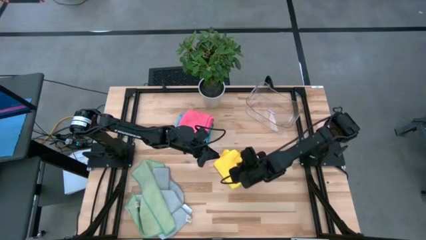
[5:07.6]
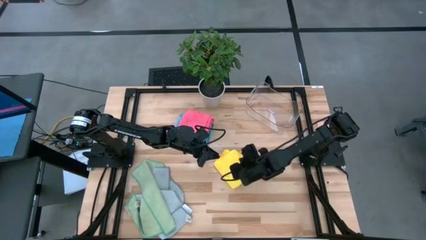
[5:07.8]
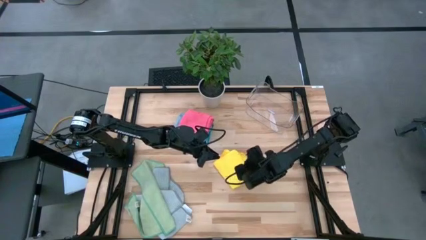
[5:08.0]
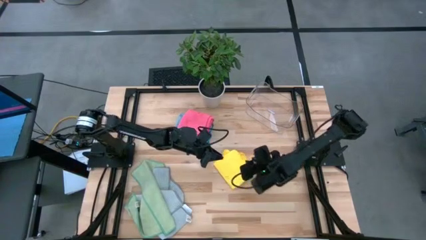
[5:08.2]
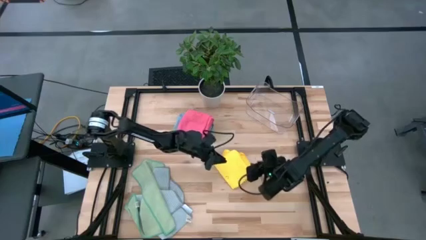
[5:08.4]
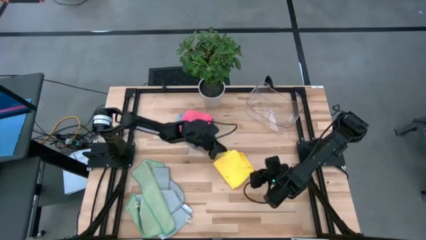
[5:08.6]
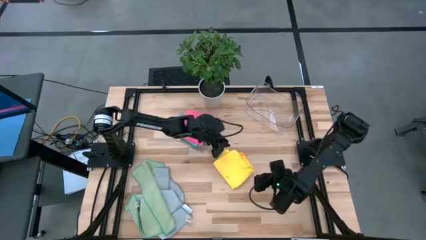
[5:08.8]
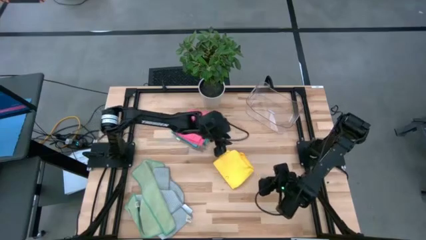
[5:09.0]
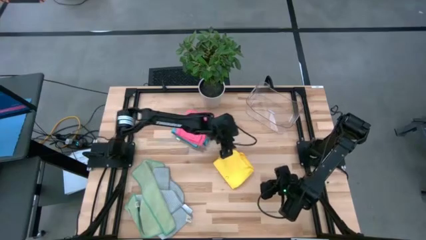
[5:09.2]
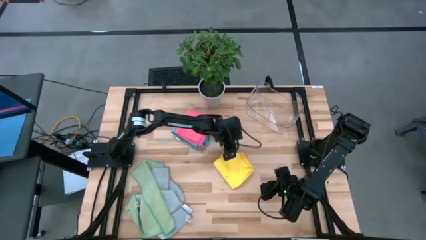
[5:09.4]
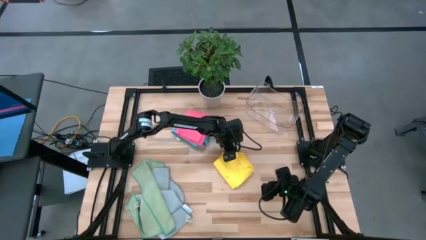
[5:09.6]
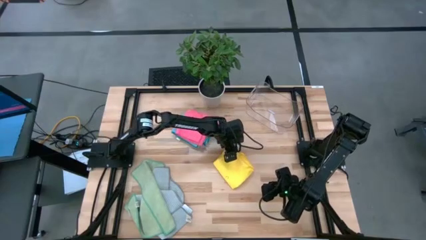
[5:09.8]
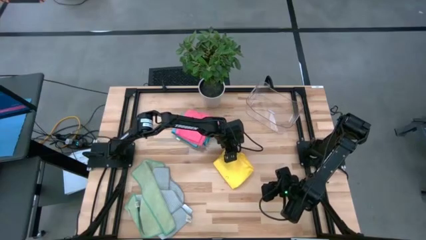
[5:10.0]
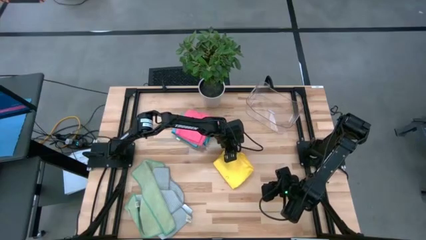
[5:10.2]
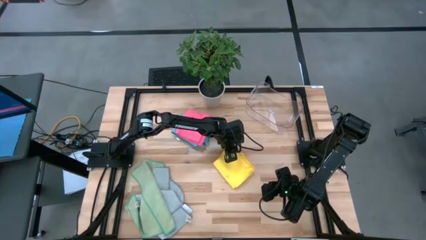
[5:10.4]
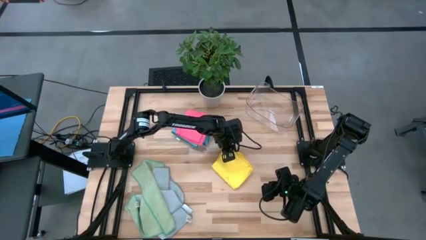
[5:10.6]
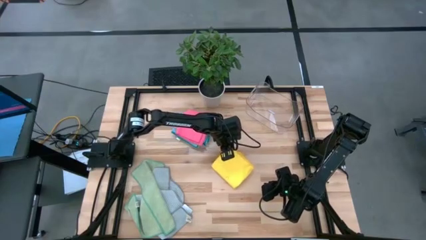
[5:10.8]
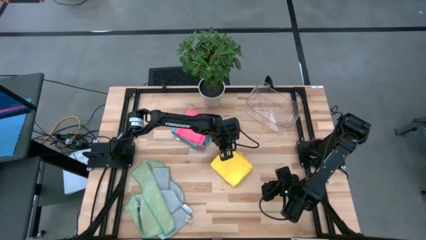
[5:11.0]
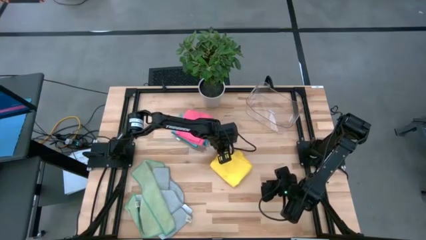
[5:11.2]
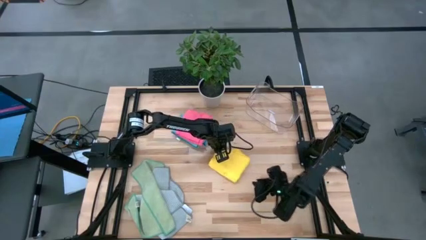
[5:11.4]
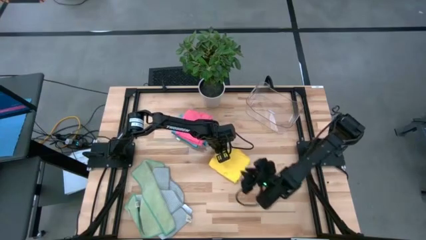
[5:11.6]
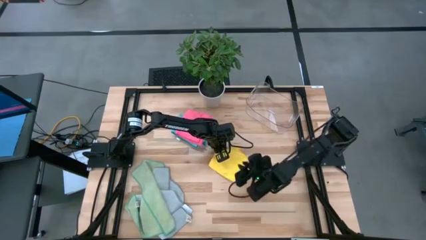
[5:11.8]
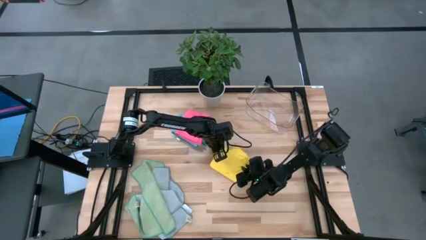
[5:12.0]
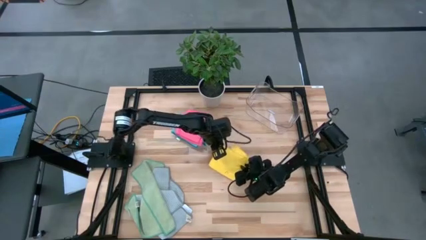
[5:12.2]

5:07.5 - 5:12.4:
Task: Fold microfiber towels
Fold the yellow microfiber towel

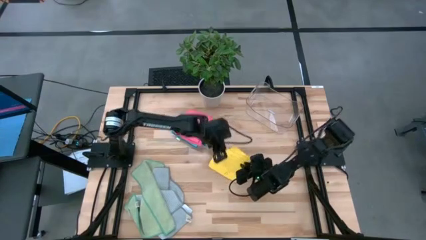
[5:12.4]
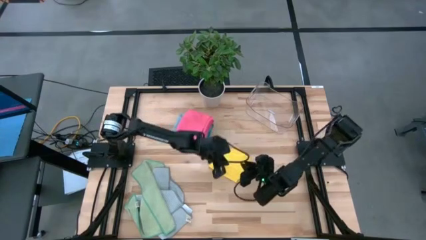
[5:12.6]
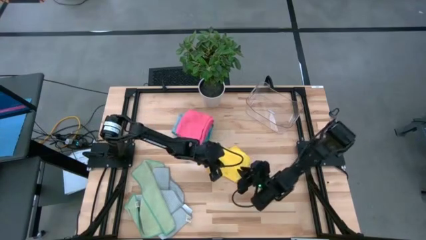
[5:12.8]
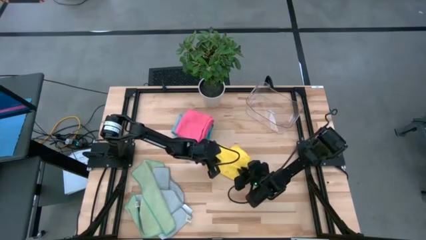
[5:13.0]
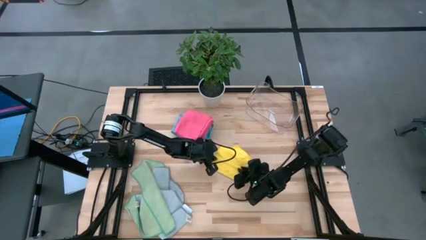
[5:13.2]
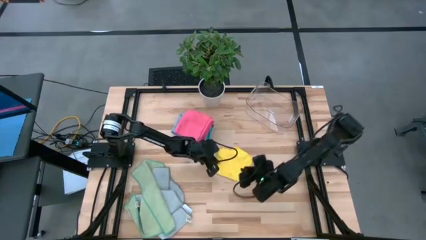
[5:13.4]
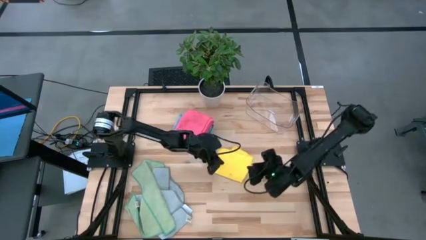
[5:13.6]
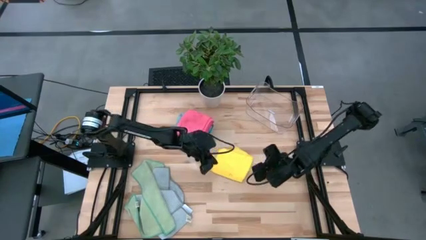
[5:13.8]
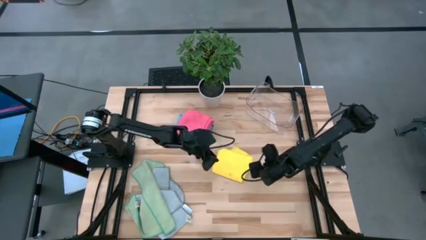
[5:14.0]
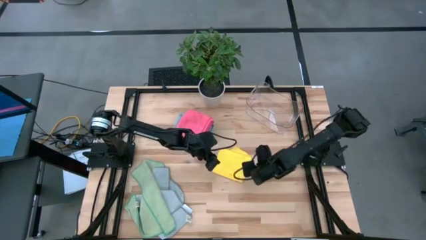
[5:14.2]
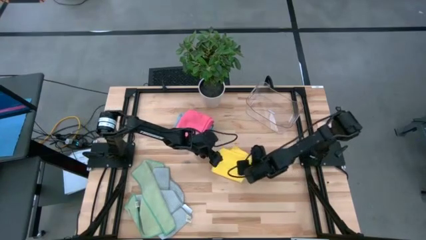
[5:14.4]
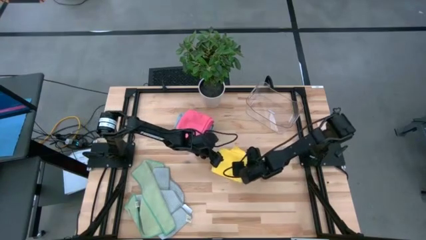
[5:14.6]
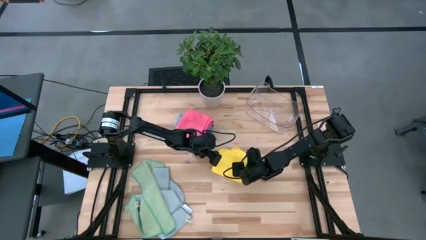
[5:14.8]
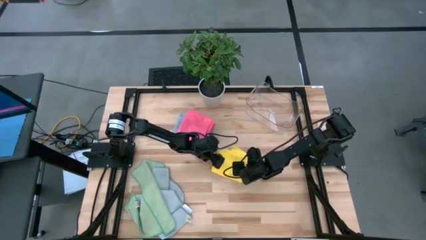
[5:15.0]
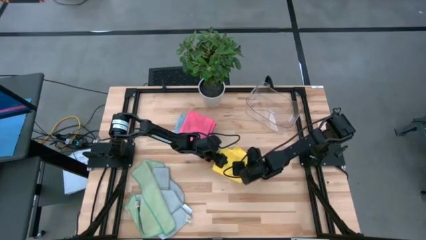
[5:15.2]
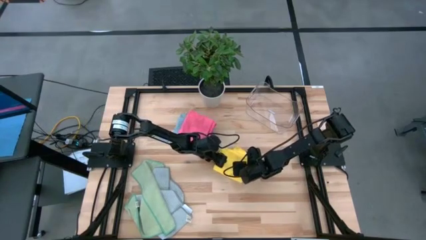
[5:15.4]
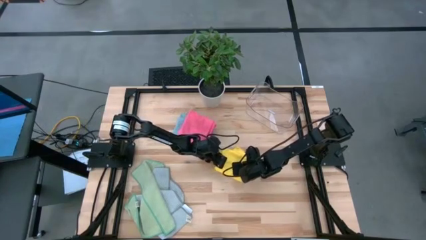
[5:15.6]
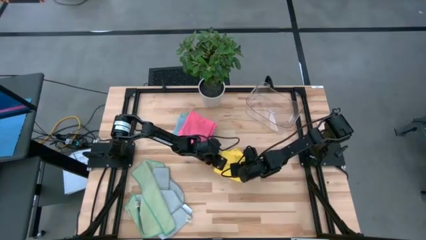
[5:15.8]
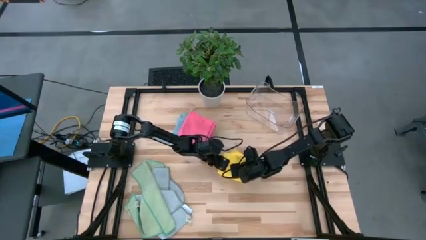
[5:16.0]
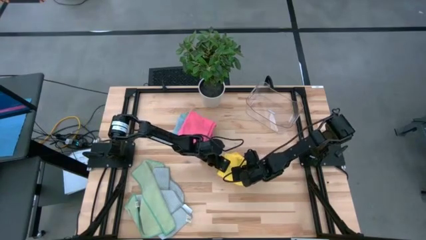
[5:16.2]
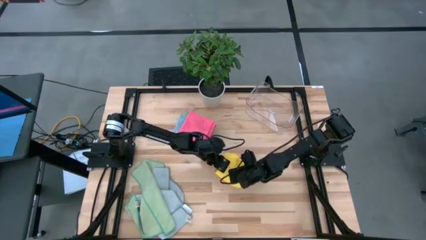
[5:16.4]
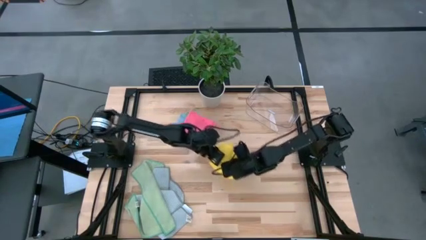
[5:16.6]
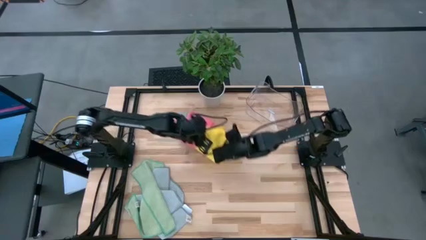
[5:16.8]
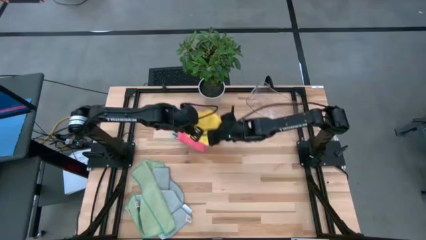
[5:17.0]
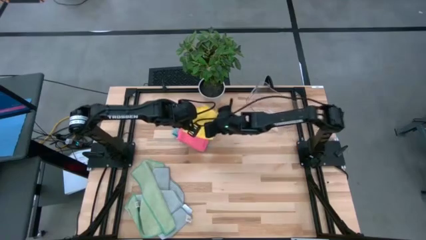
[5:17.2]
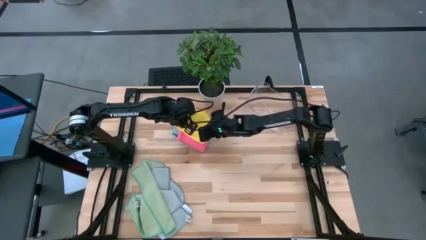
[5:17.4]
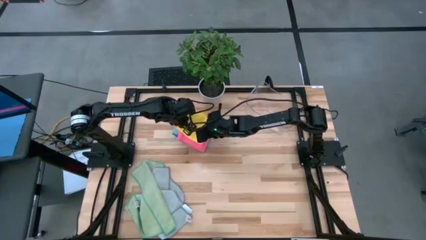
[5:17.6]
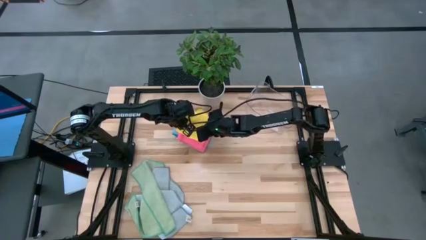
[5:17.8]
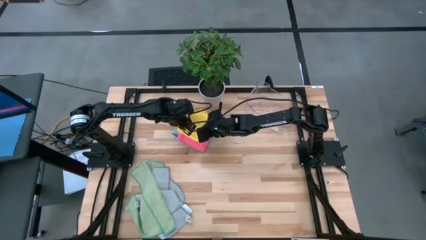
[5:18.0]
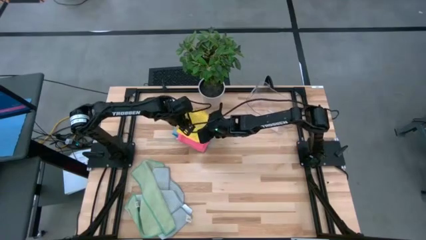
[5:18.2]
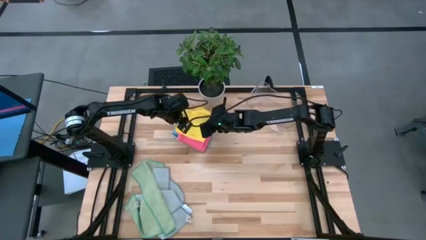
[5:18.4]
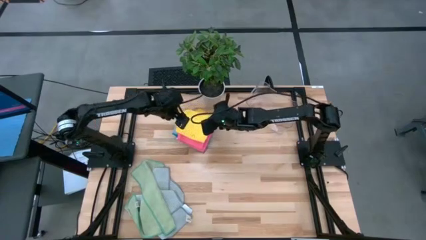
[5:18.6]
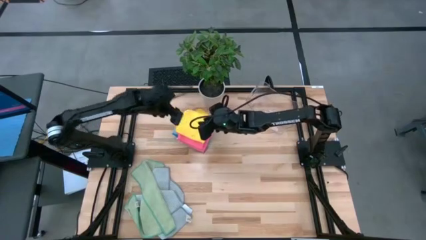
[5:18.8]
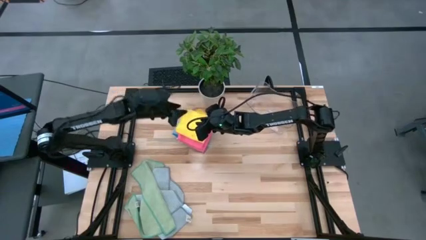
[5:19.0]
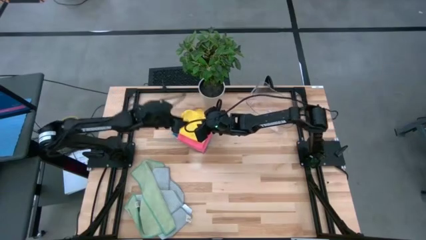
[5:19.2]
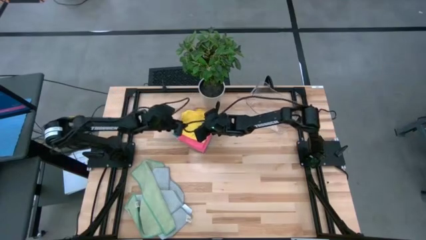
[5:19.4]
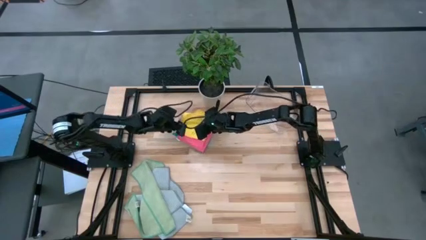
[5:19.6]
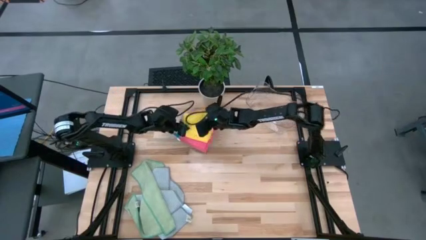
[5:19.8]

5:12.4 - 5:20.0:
Stack the yellow microfiber towel on the pink microfiber towel

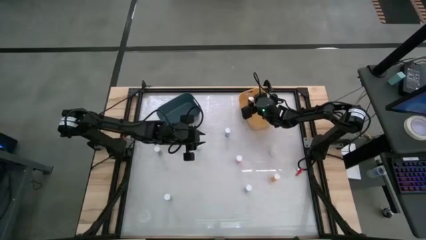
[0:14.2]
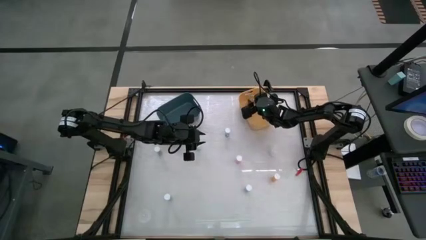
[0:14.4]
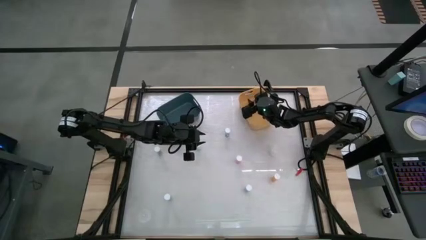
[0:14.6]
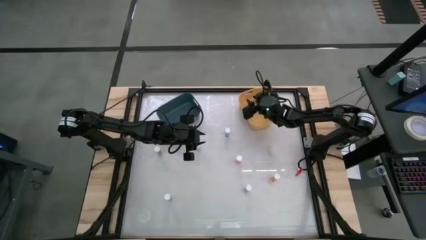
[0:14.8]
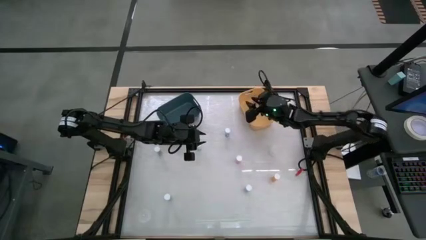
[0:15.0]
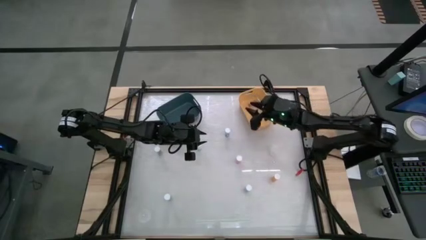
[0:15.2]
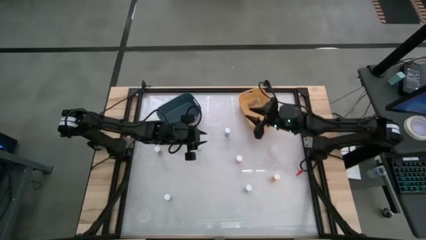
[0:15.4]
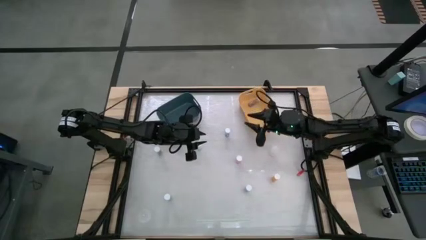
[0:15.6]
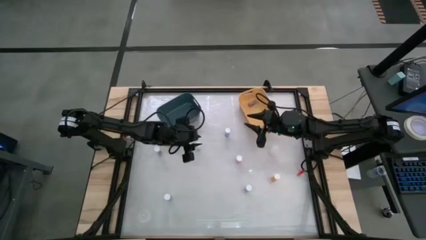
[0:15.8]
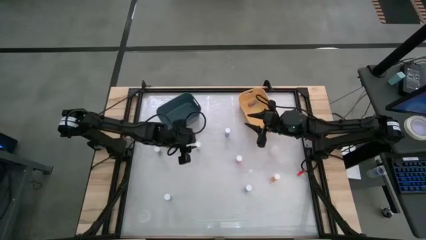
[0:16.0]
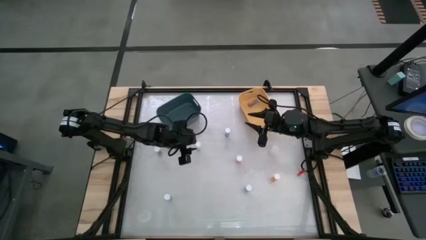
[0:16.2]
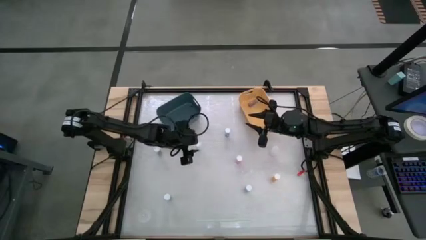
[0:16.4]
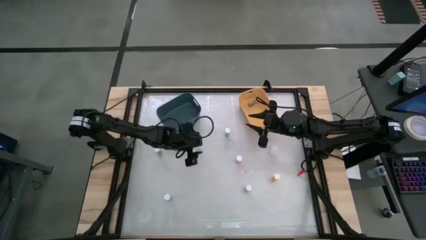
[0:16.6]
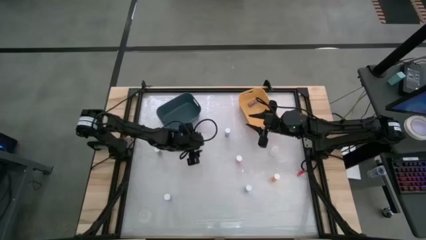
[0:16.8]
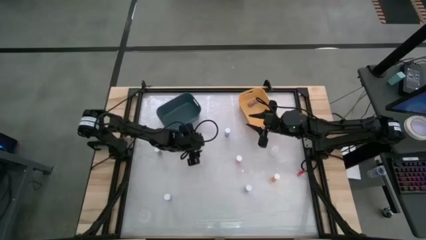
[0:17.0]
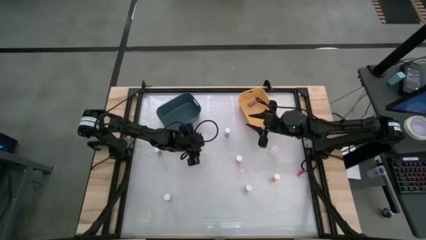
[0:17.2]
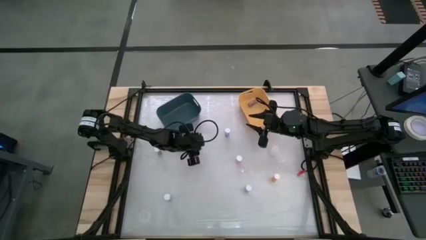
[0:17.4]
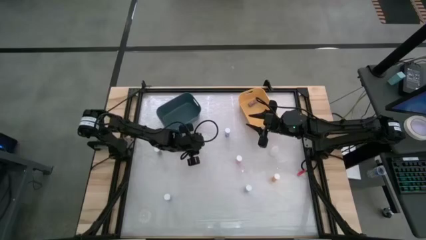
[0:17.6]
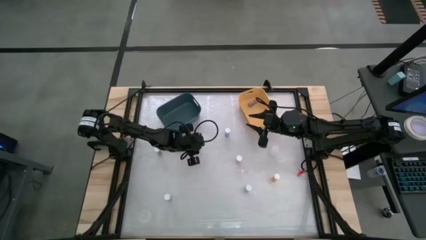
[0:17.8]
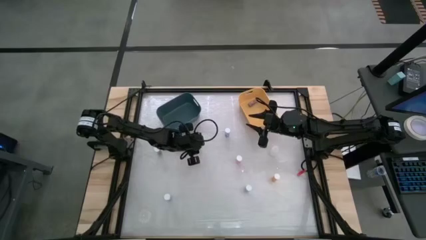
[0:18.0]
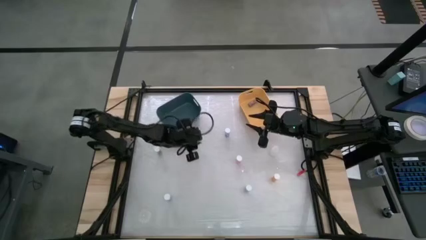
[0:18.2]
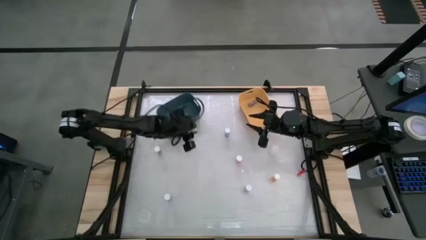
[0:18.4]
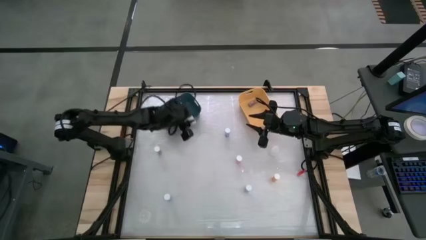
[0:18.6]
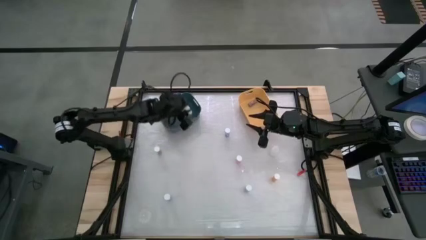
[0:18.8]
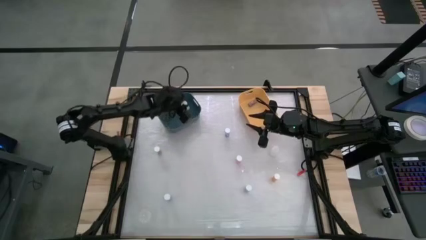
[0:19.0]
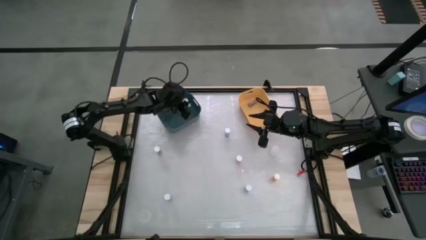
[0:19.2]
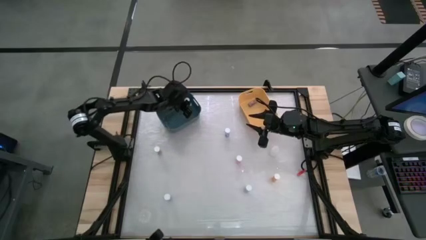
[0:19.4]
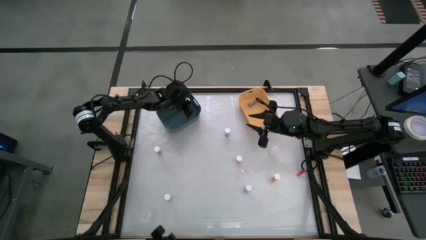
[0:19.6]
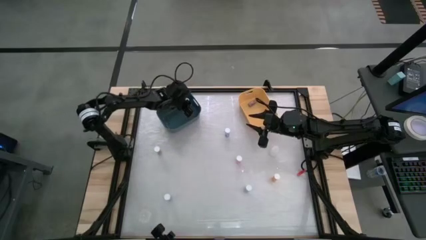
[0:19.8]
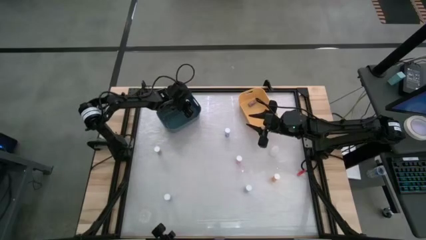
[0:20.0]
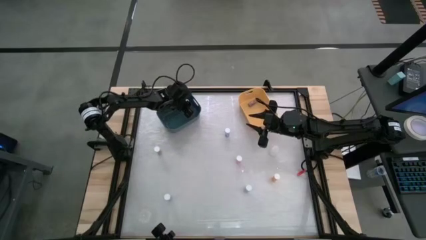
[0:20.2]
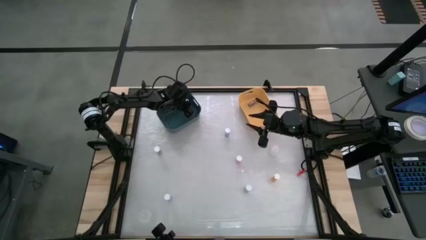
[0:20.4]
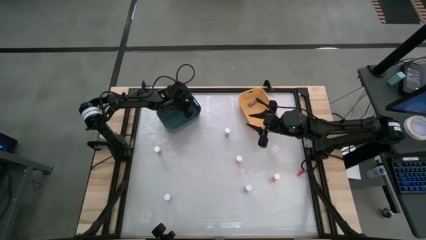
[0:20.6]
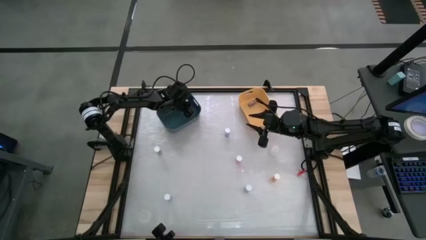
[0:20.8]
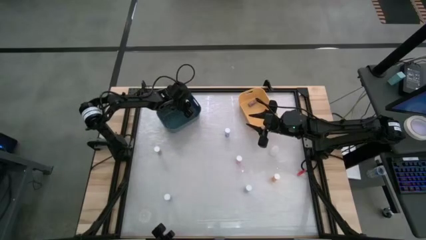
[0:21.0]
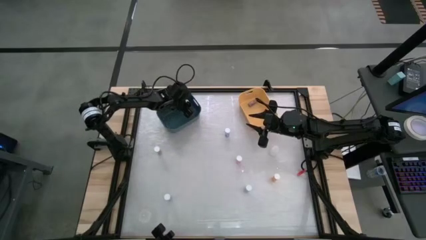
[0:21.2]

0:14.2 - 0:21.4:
Task: Pick and place medicine bottles into bin by pill shape (circle, oval)
Put the blue tablet bottle into the blue bin
